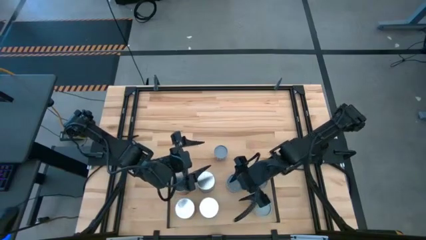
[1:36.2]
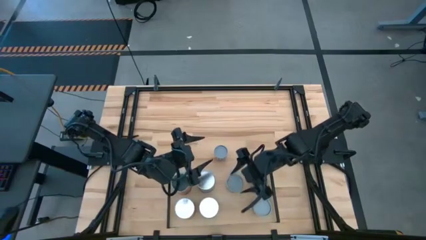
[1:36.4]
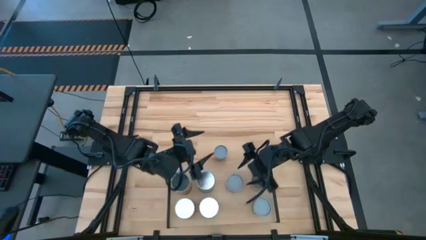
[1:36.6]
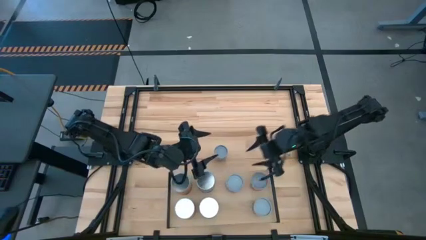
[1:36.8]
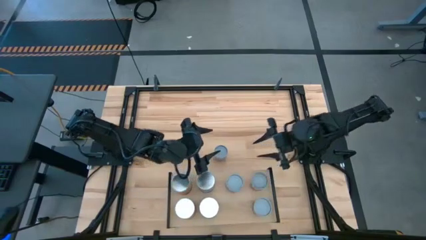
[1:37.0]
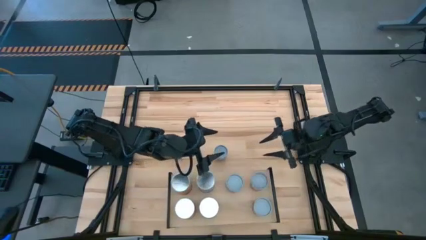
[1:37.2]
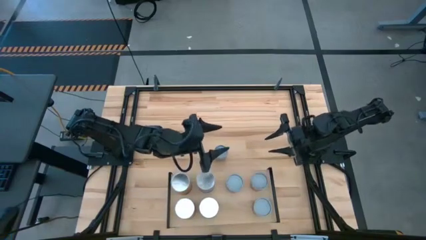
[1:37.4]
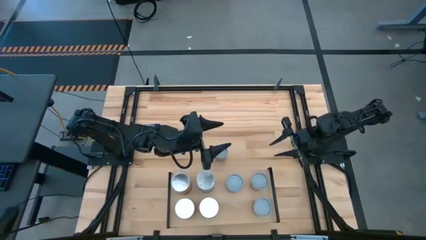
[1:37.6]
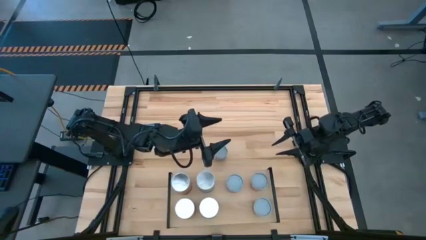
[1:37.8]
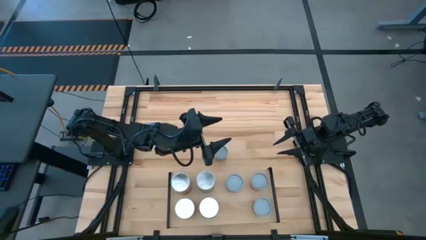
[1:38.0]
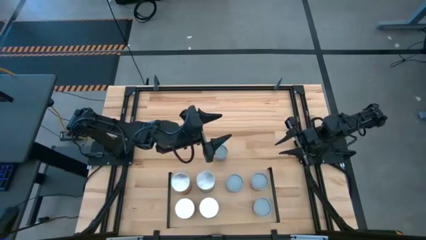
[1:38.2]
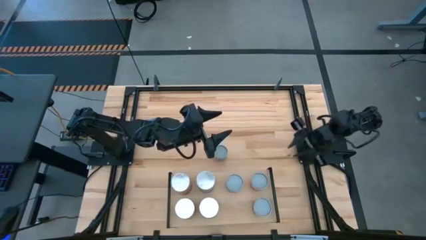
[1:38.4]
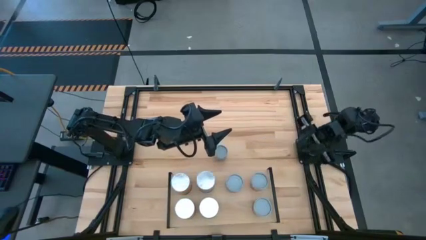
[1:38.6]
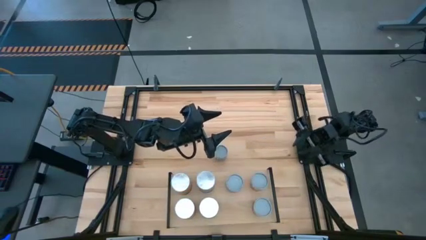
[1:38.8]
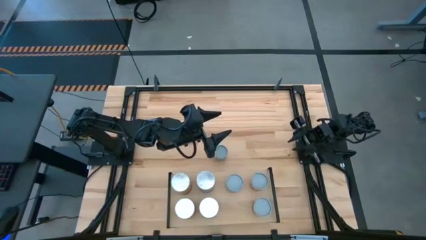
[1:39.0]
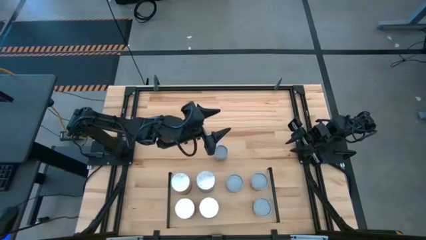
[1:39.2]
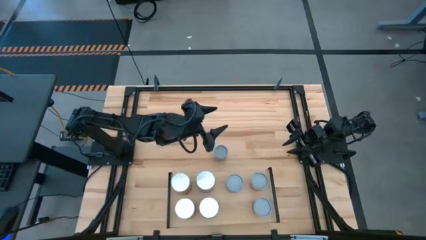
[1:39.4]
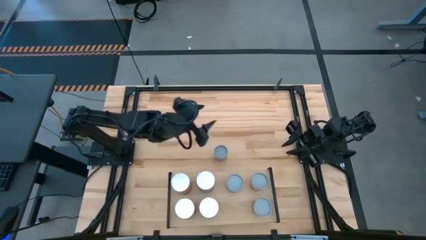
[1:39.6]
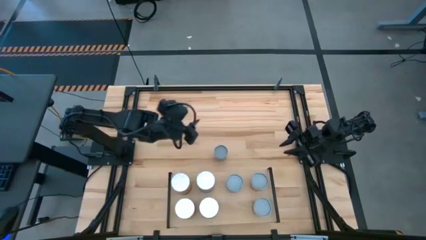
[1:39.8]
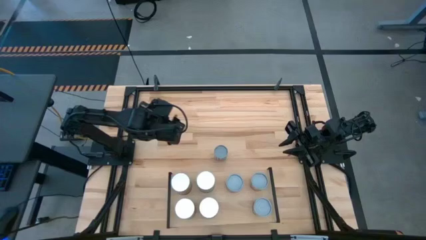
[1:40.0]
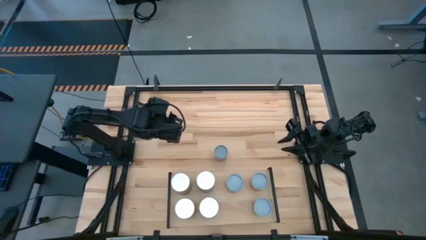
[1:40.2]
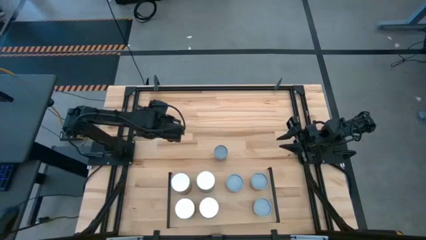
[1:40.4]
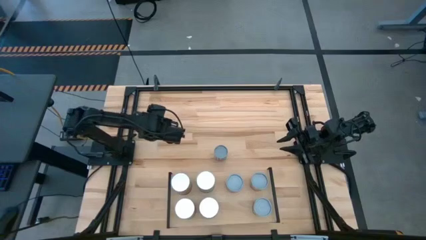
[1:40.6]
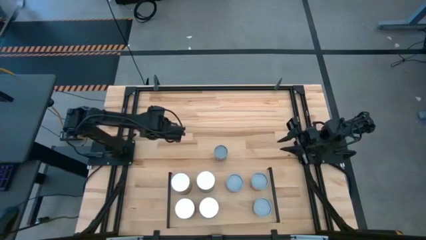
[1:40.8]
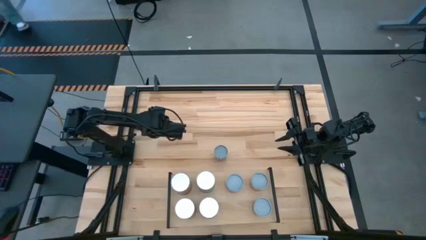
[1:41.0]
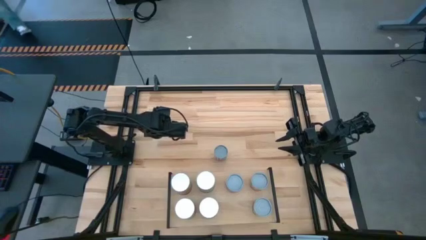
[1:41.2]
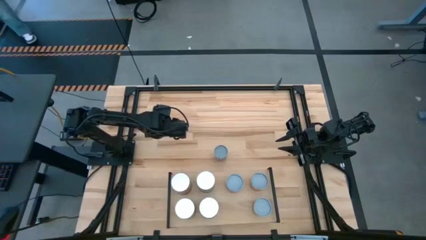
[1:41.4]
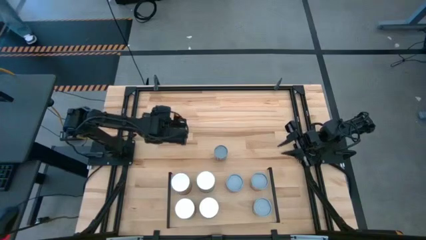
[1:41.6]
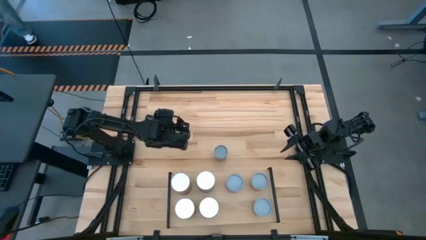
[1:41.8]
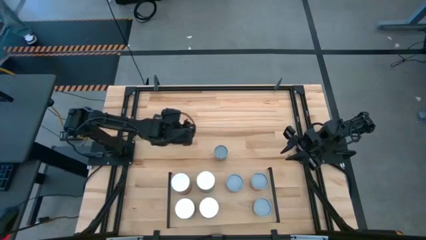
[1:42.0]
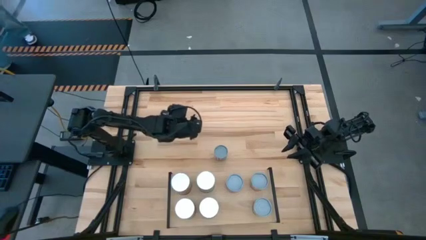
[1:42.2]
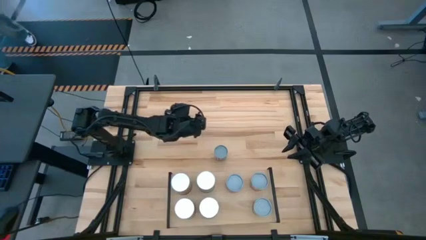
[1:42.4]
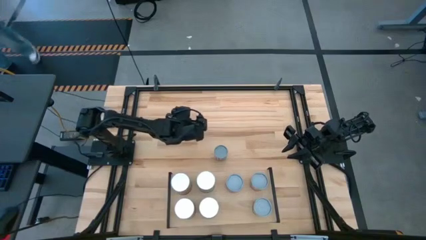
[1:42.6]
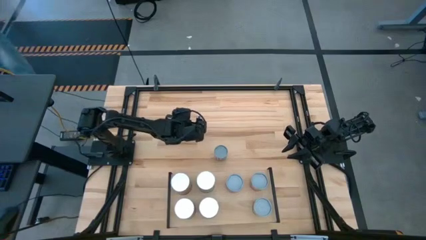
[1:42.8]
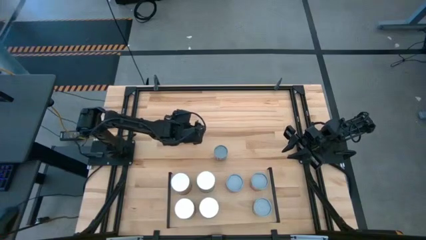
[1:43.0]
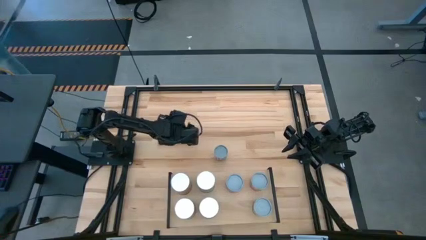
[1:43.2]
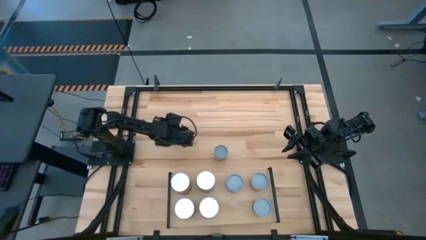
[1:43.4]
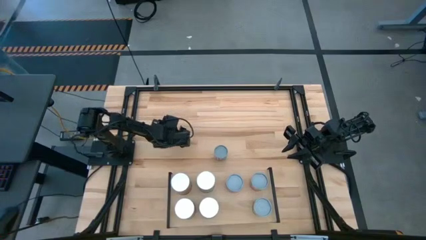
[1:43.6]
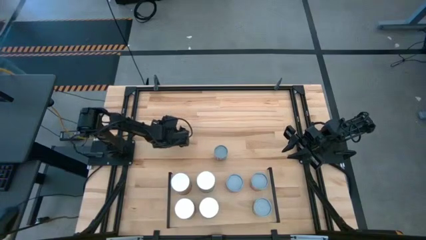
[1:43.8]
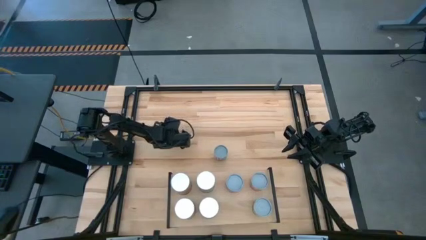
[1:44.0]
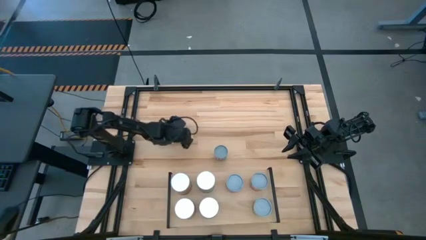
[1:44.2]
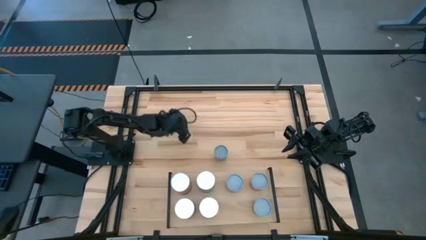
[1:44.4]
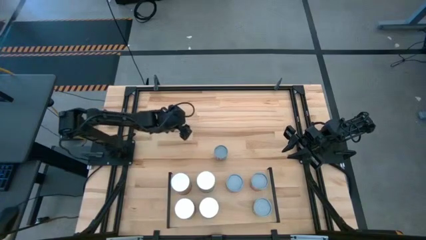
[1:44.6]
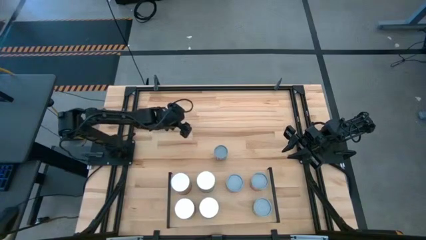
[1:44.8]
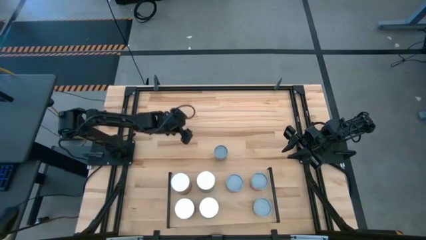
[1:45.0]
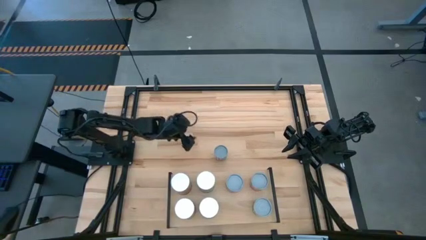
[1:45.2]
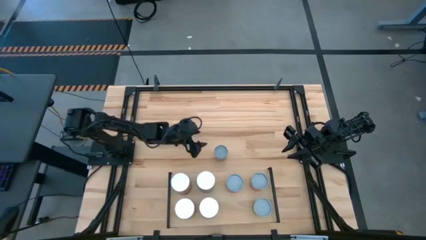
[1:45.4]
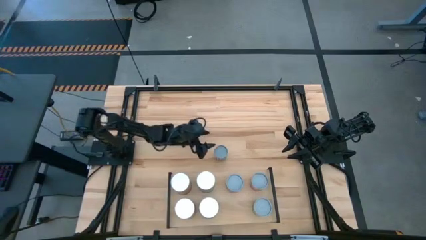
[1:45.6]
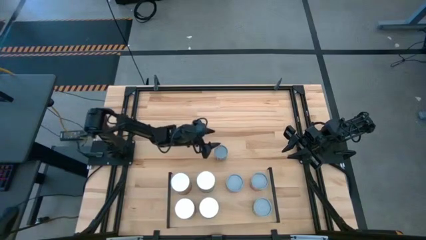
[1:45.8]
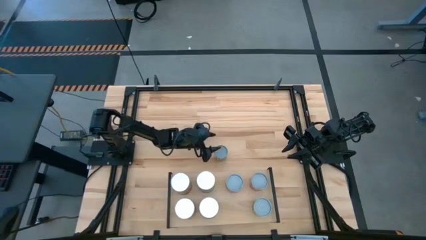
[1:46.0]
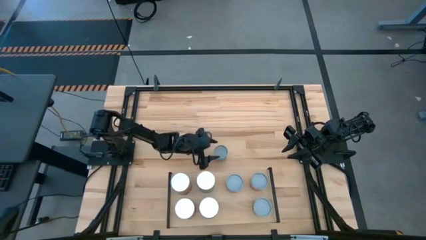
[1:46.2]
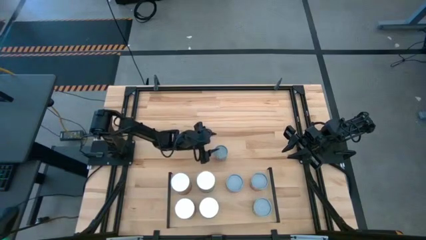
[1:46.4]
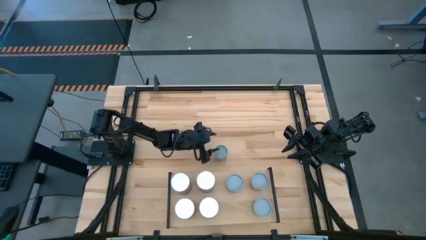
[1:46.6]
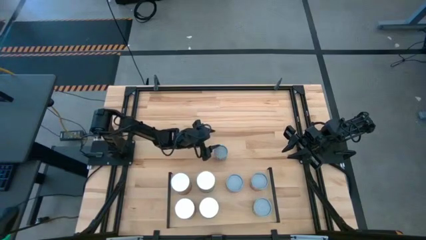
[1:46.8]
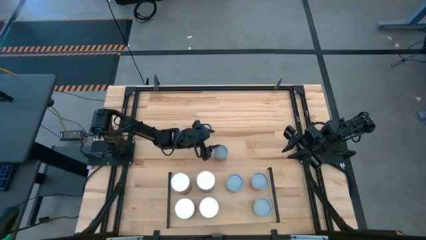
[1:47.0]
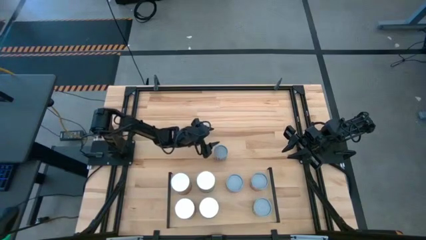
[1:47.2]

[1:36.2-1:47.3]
Task: Pick and place cans onto a shelf
Put the canned carrots on the shelf

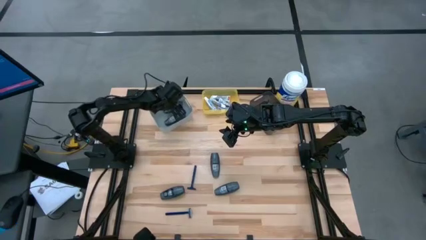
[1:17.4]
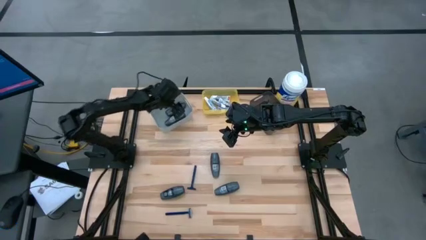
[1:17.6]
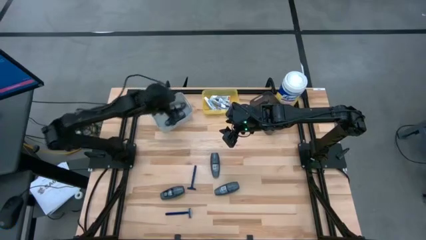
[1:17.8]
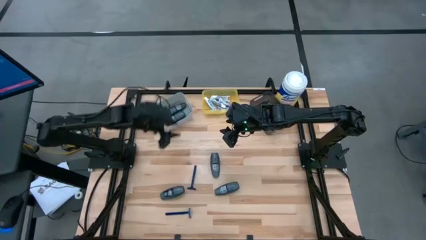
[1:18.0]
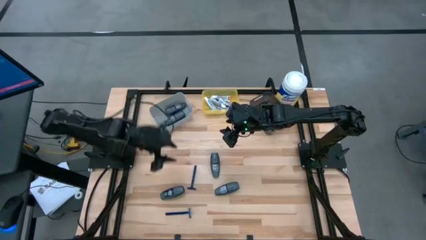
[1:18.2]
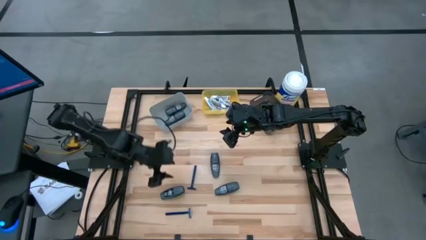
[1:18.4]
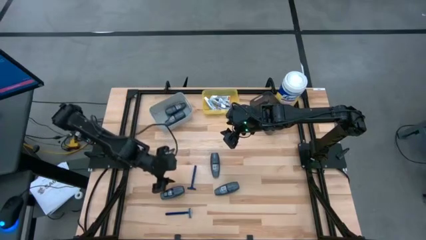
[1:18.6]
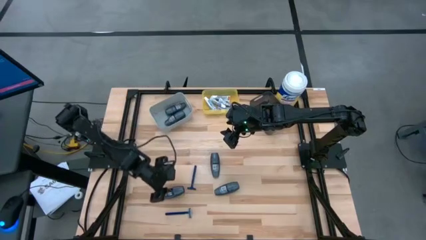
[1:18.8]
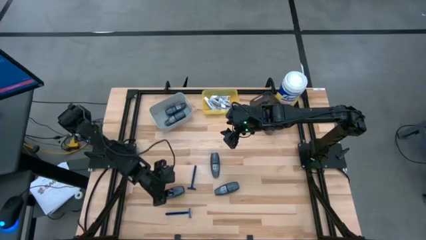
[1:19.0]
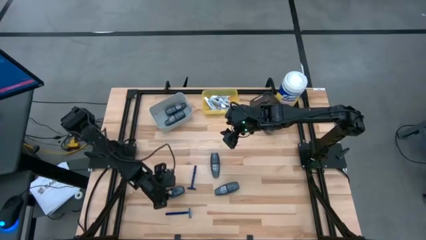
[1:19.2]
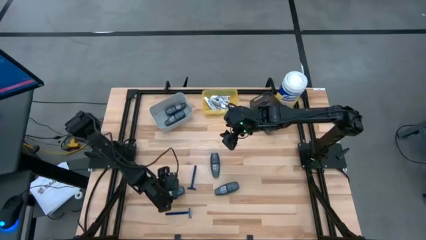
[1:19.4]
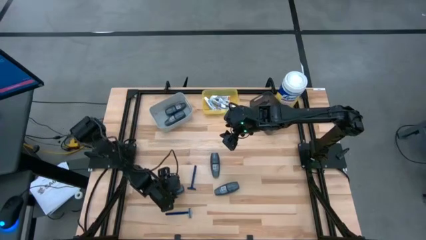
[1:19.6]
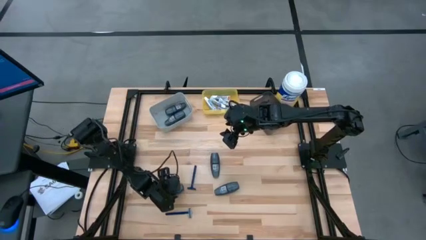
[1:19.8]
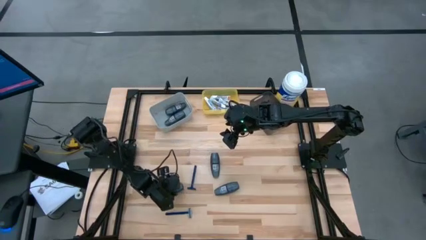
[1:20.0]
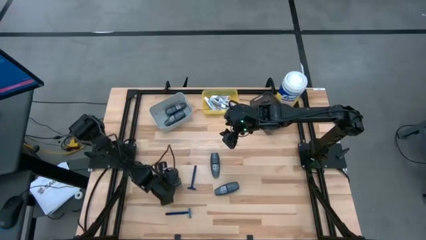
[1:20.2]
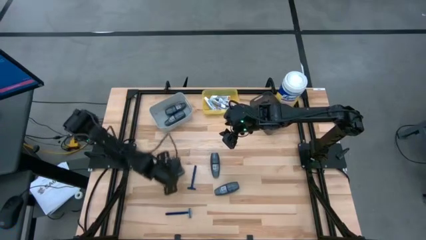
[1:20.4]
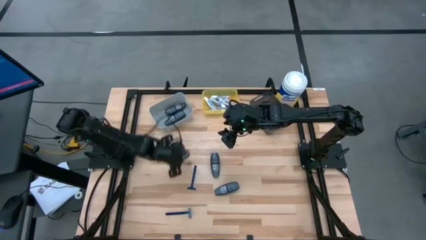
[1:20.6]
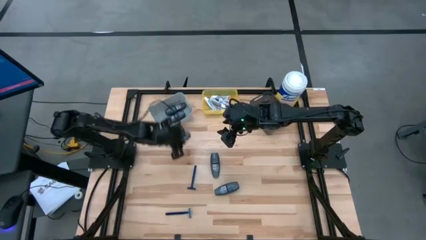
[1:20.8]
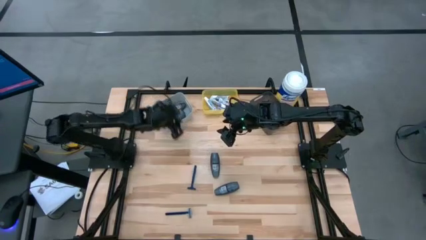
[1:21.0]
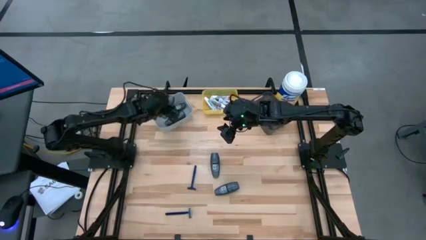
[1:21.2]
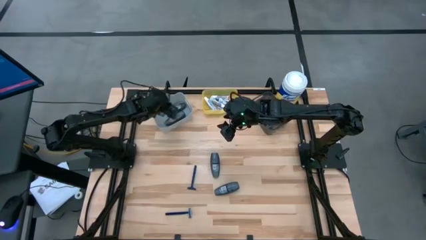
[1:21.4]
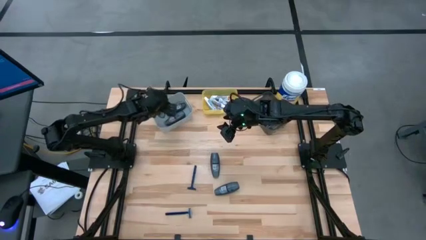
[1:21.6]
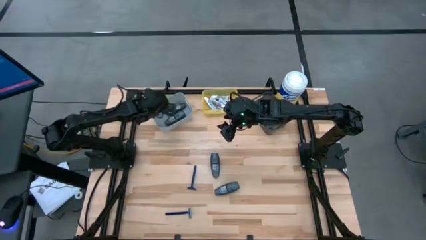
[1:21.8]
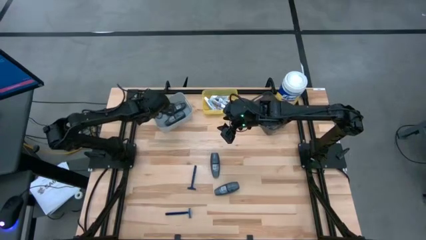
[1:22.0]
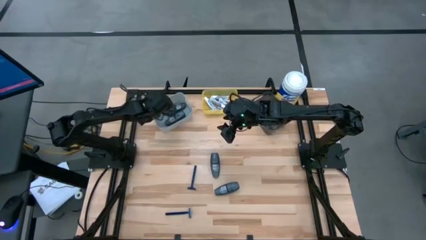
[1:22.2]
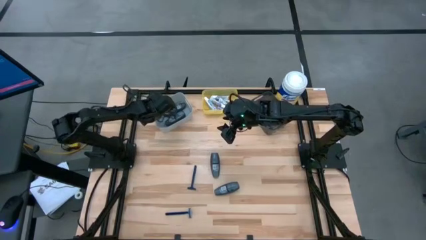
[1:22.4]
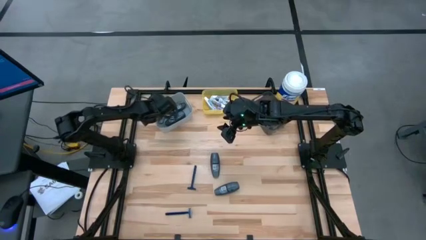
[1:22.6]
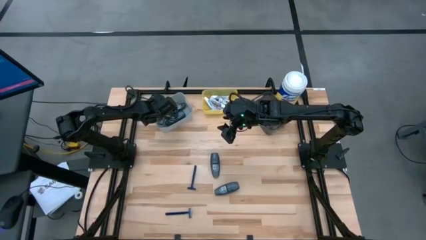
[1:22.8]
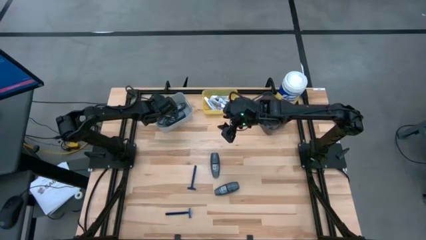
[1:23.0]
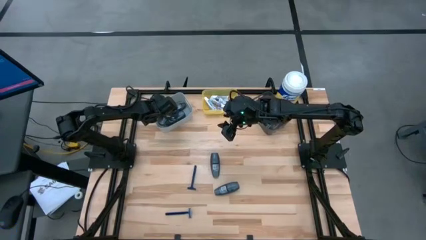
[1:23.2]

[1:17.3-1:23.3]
Task: Pick & Place Travel size toiletries
Put the gray deodorant into the gray bin
